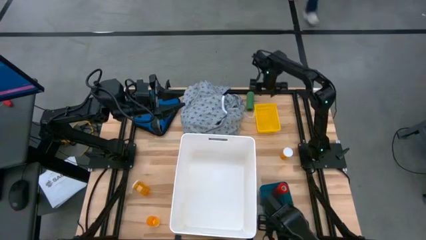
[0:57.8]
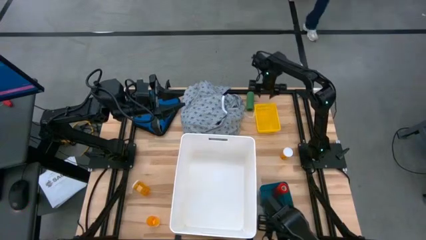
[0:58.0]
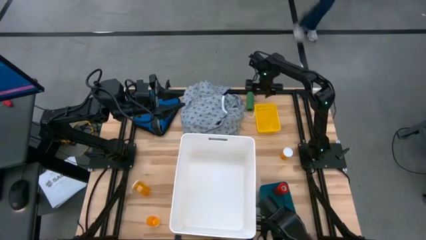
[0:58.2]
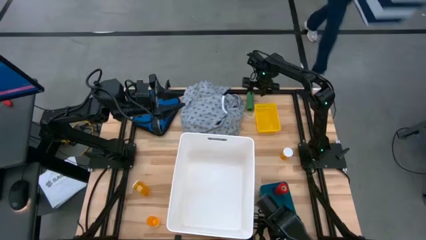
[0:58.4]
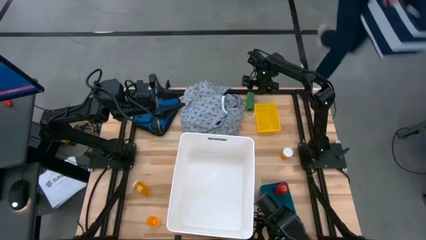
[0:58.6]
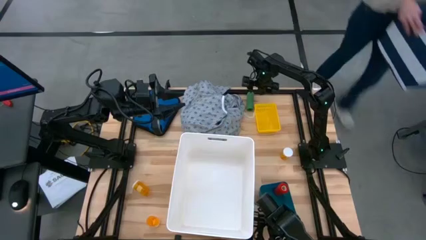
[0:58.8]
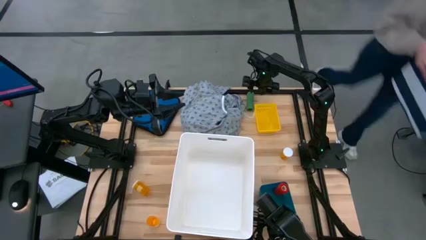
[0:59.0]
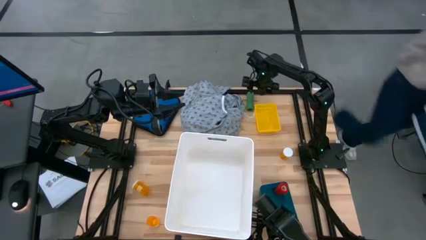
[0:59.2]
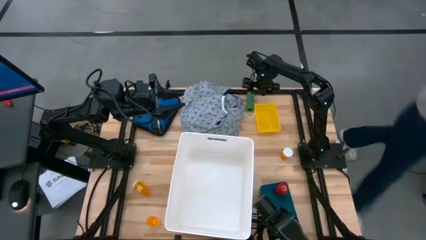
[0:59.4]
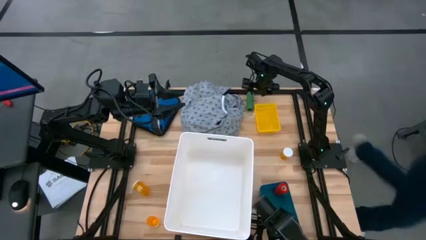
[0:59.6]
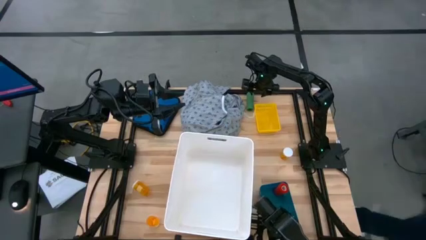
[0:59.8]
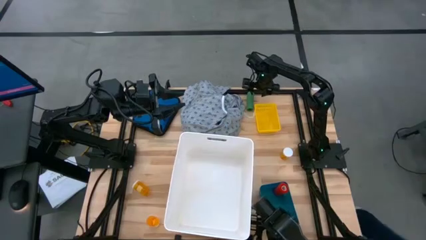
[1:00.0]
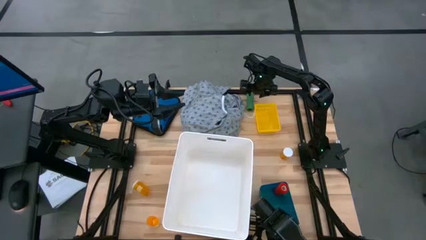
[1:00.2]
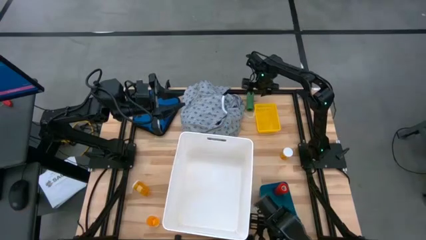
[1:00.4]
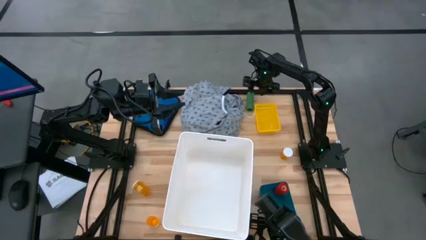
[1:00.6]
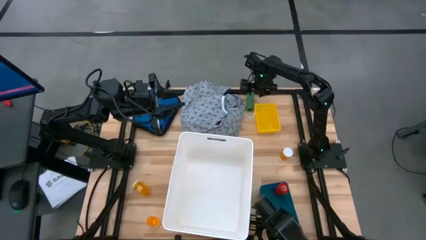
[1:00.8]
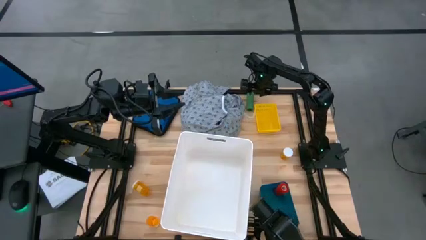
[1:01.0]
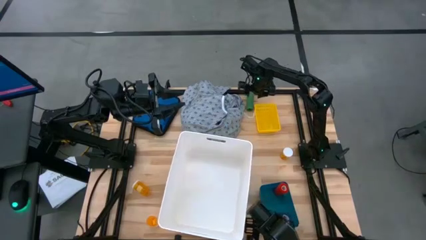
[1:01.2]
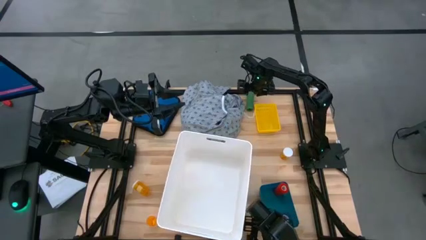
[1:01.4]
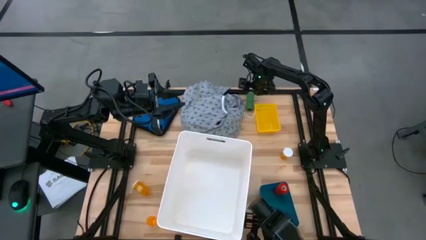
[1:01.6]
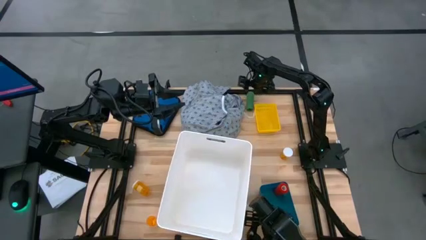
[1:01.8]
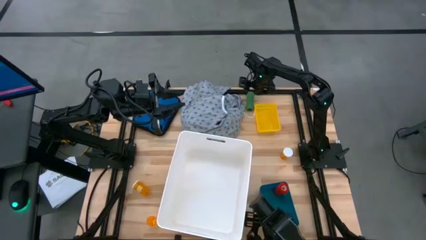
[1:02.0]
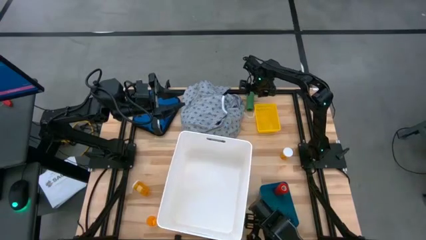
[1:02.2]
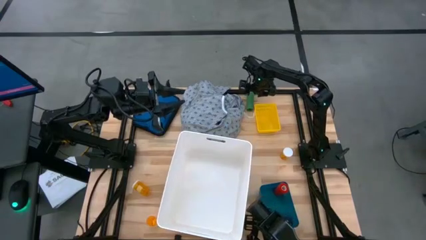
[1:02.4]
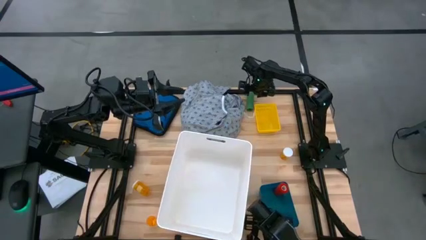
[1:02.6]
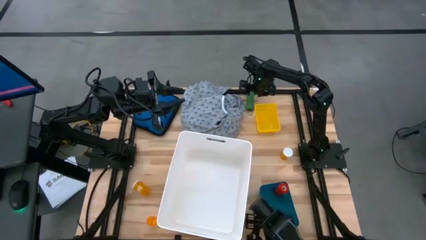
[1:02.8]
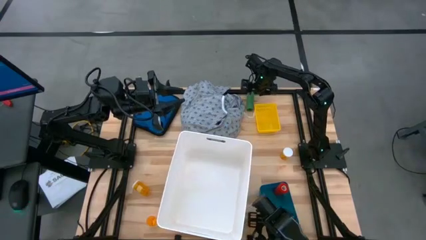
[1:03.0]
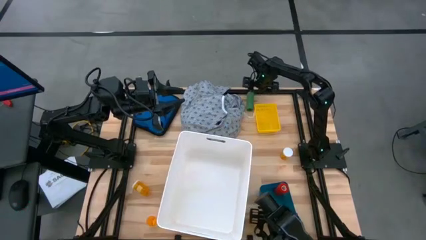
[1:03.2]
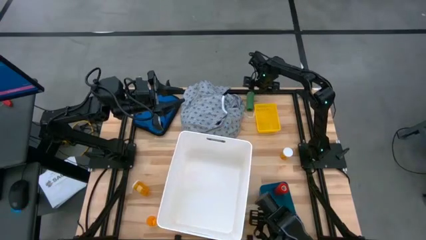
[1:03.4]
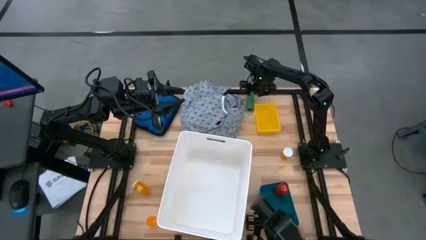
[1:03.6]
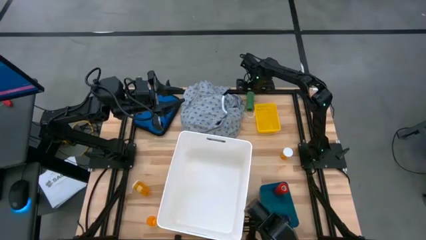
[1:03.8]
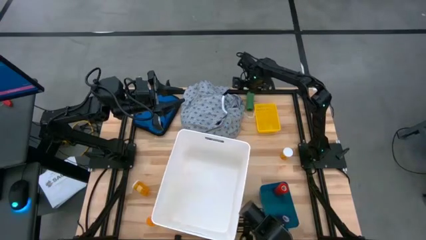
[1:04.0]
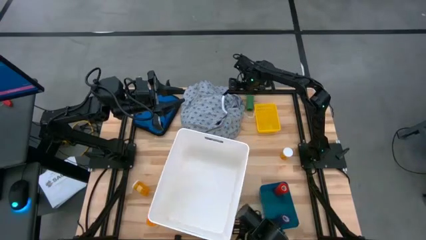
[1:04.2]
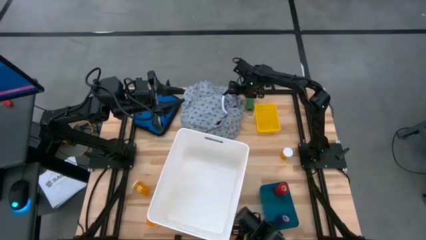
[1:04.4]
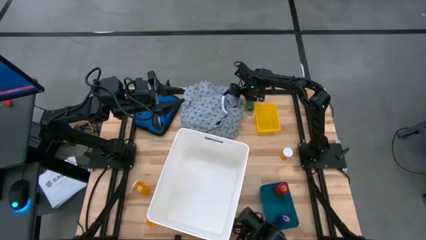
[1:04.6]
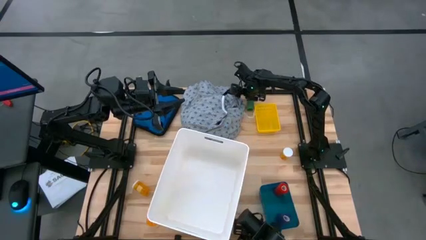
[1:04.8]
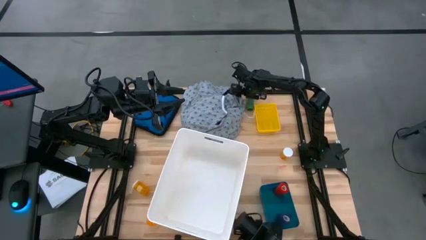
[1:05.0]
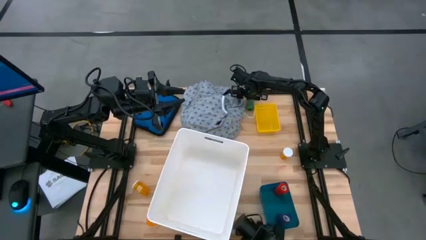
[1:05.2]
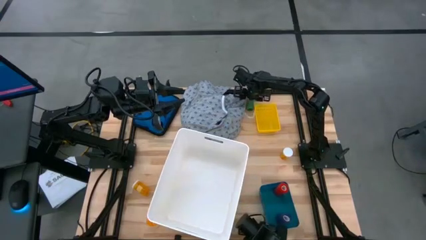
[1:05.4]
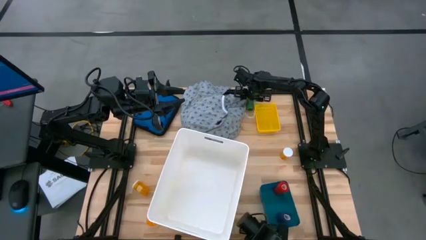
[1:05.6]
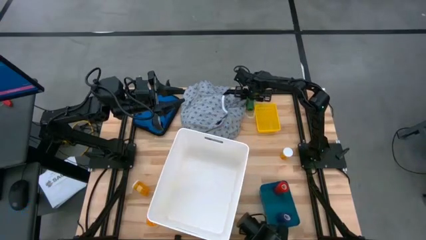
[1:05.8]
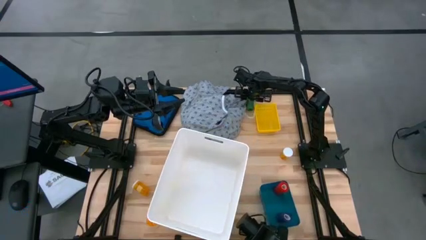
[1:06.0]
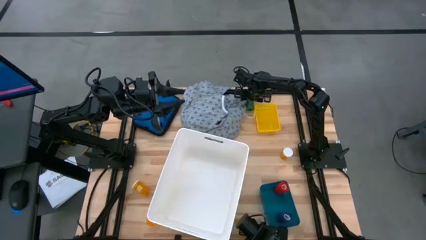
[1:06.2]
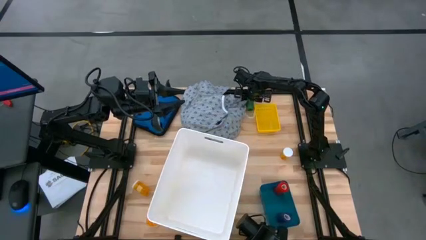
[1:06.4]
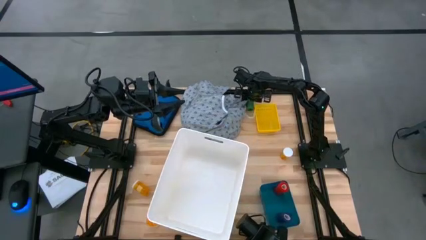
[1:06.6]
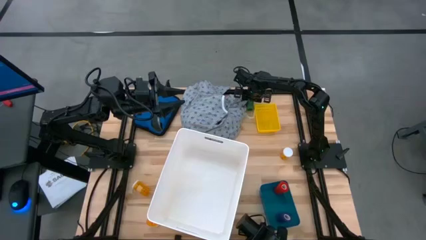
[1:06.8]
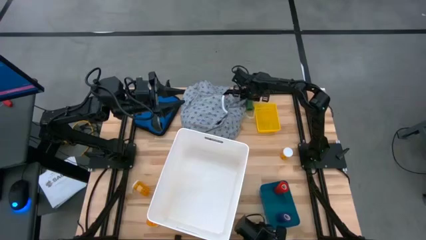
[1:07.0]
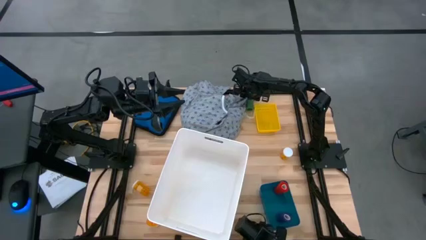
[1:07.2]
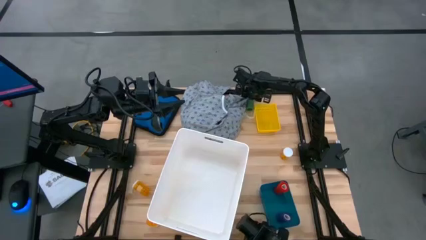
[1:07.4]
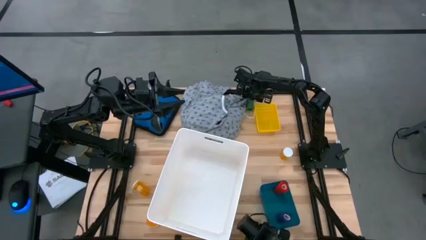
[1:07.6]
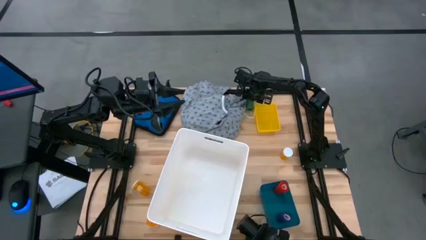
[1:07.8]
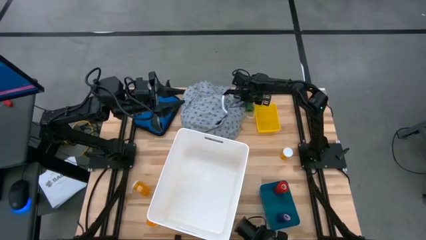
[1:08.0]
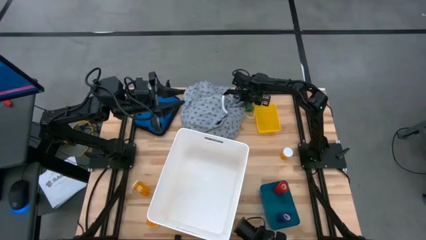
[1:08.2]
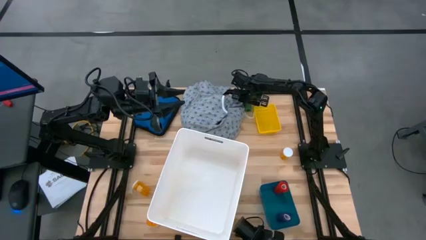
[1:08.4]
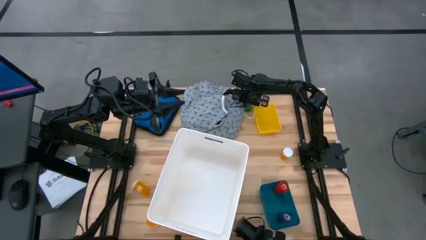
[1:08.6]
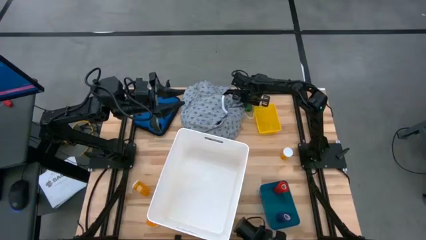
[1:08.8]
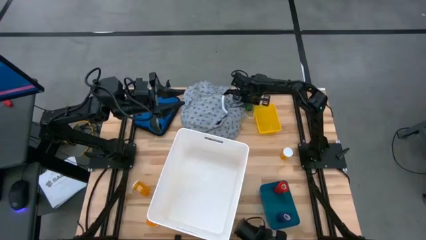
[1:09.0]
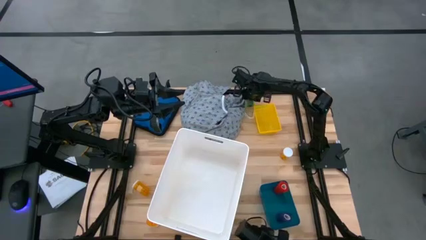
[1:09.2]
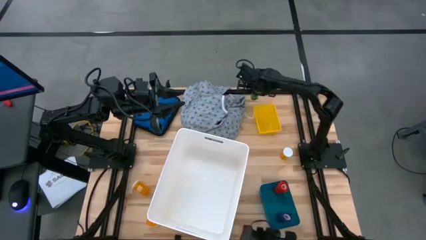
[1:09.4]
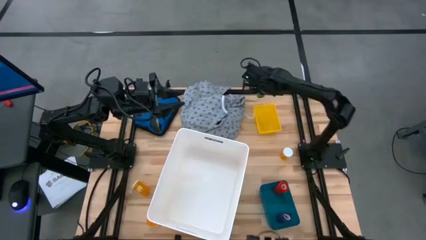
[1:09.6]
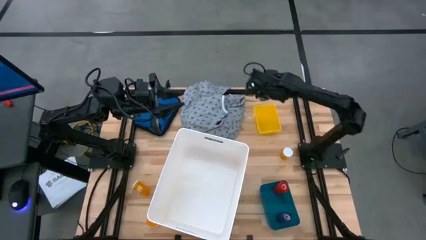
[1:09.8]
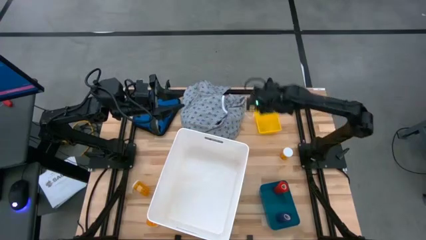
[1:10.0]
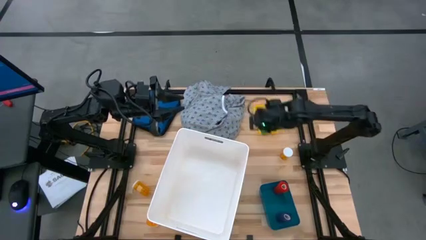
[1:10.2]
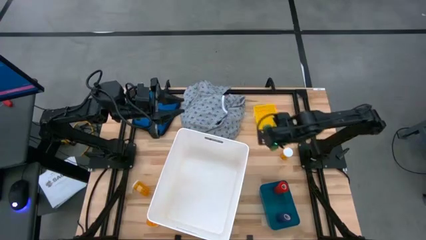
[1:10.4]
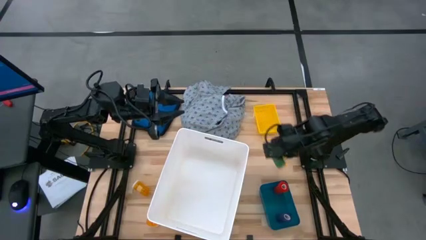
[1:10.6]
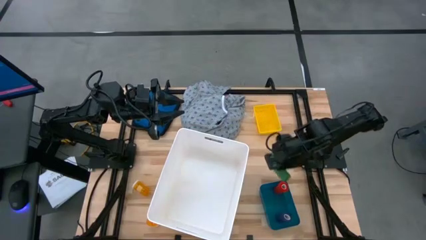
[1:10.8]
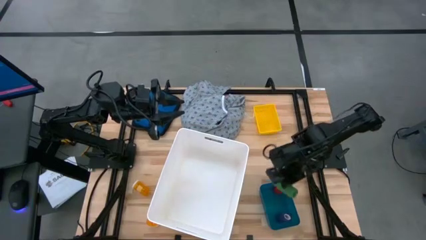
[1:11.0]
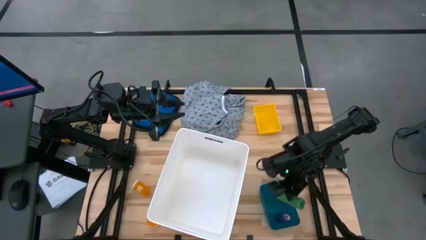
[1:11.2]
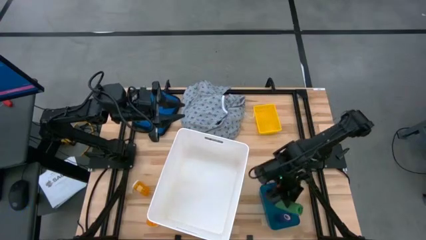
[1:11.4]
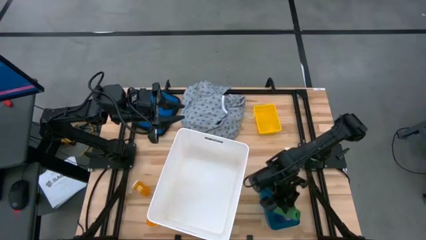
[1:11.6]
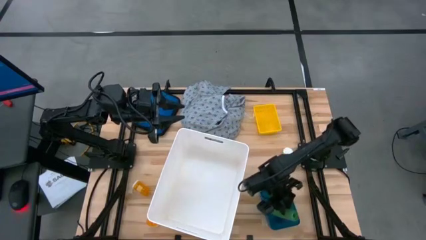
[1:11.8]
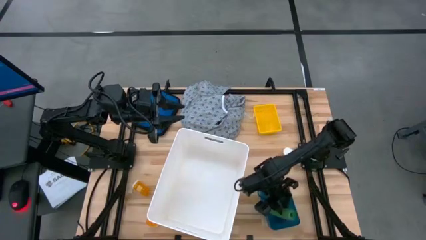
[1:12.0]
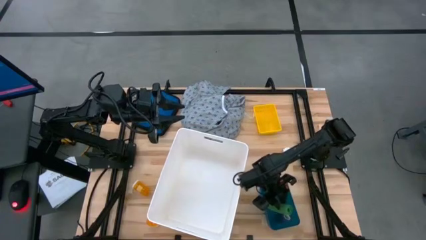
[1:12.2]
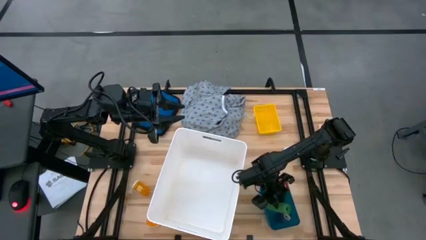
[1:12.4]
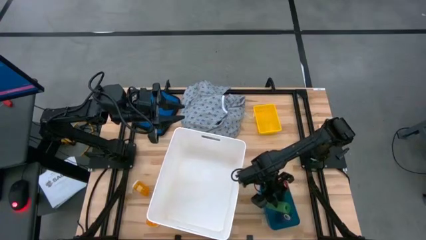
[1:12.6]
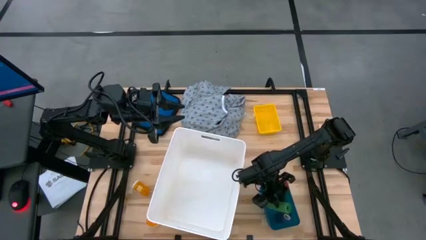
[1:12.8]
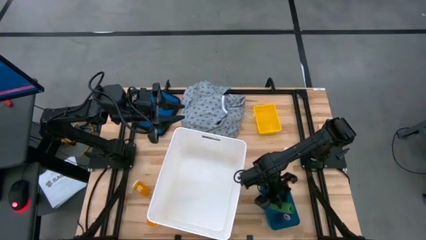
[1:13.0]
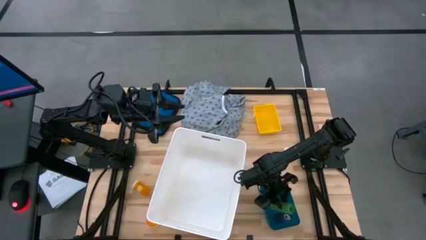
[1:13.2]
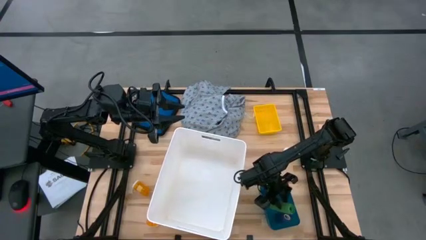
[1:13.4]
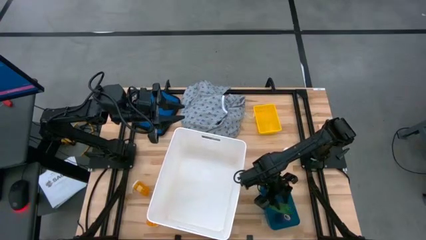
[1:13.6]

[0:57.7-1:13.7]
Task: Pick & place medical supplies in basket/bin
Put the green bandage into the blue bin

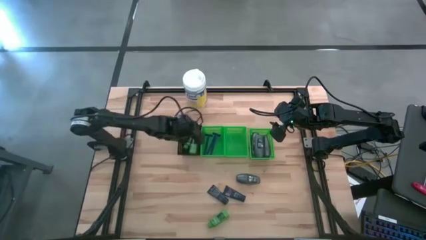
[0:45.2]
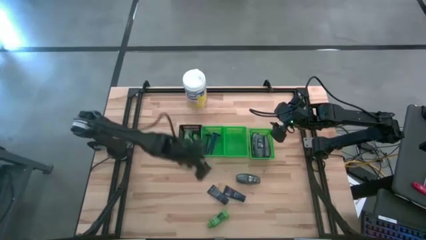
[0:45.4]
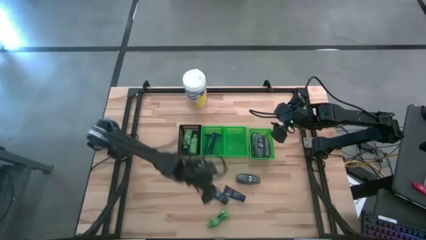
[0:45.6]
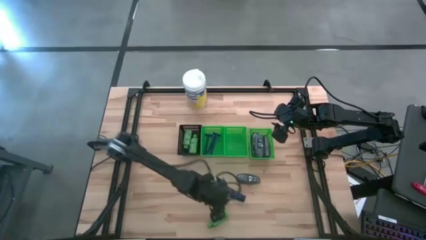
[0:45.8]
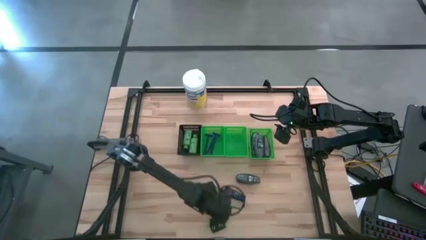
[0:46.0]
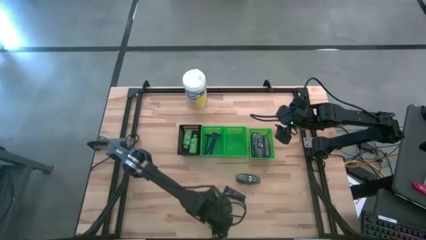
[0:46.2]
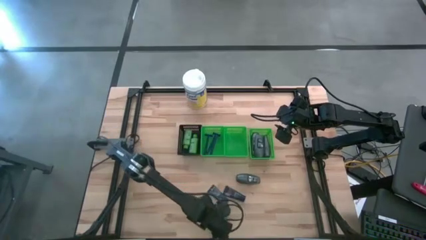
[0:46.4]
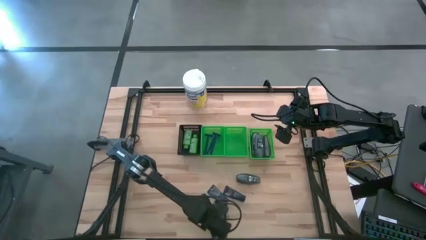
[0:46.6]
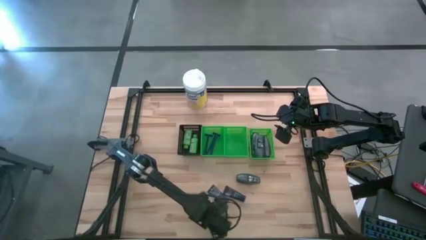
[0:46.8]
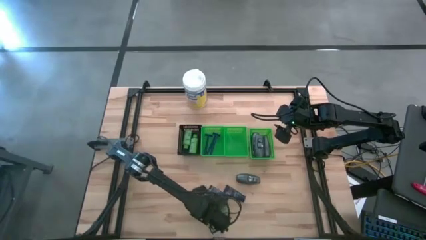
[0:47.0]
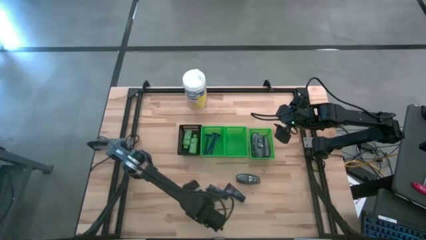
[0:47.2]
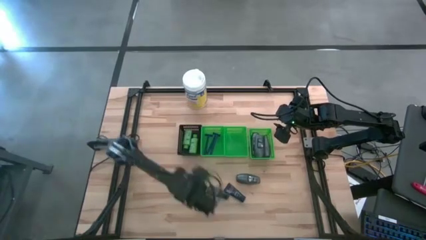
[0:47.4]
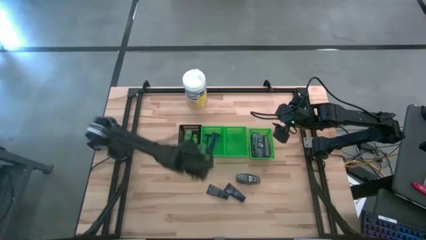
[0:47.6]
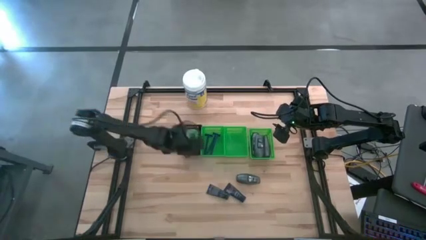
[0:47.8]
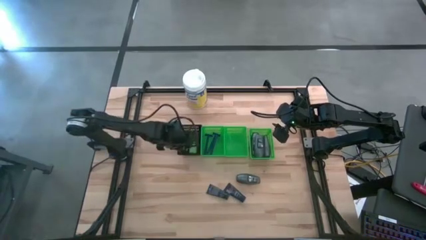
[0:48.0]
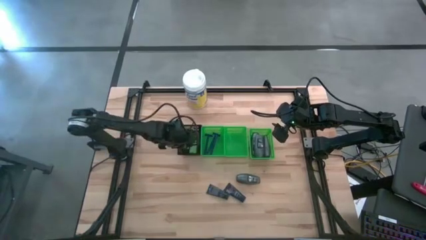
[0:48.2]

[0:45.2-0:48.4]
Task: Pick & Place Travel size toiletries
Put the shampoo into the black bin
